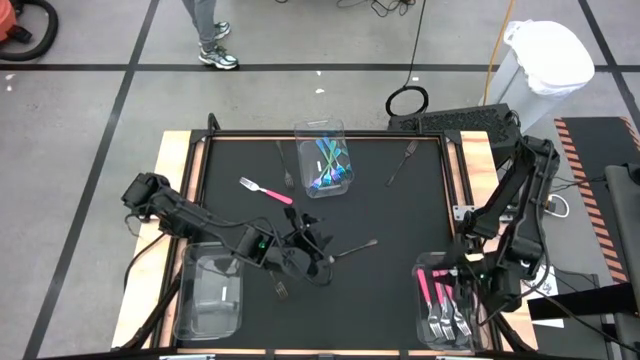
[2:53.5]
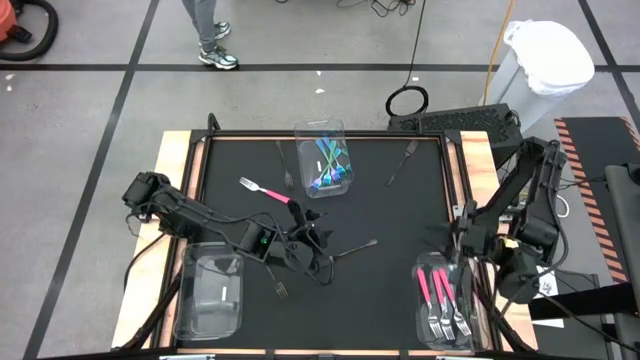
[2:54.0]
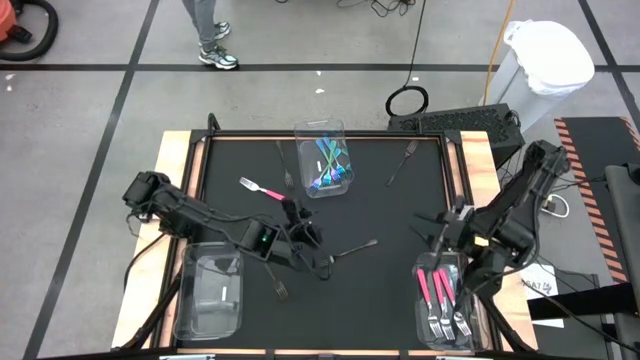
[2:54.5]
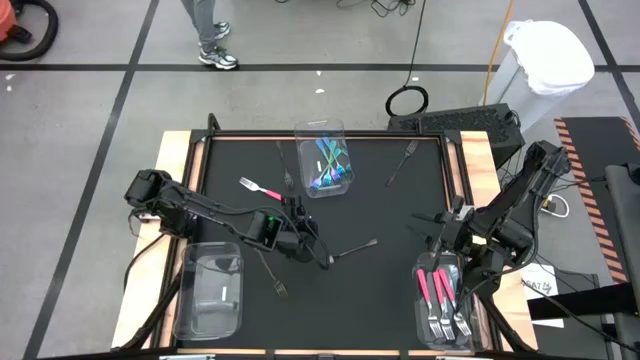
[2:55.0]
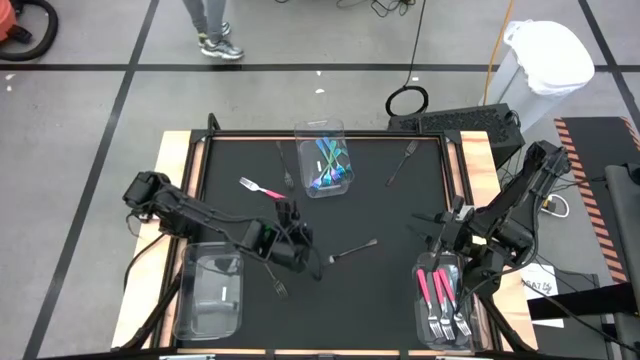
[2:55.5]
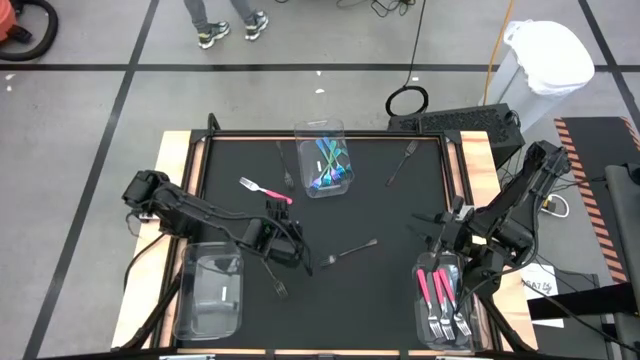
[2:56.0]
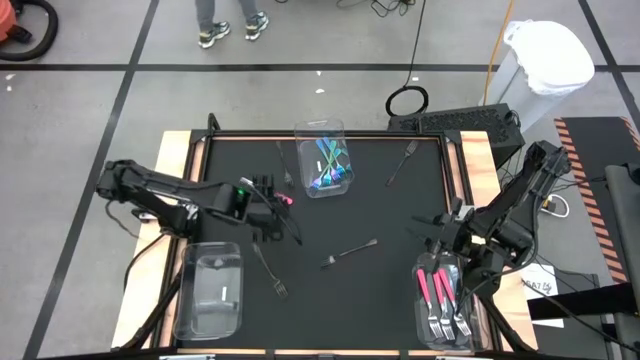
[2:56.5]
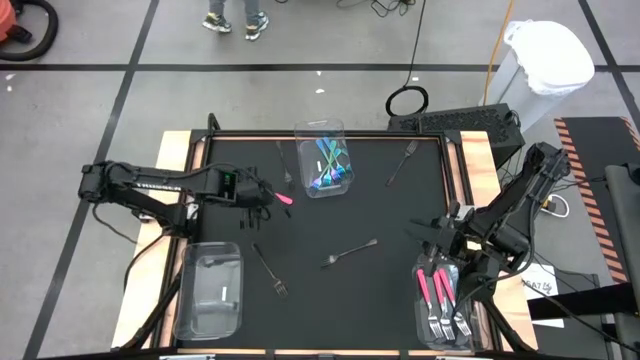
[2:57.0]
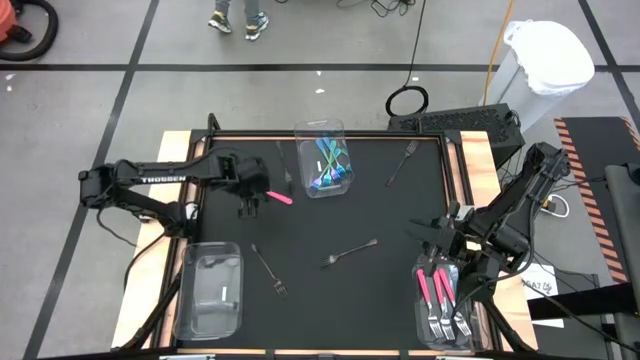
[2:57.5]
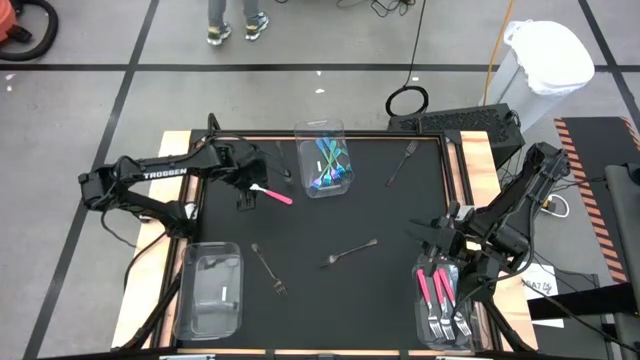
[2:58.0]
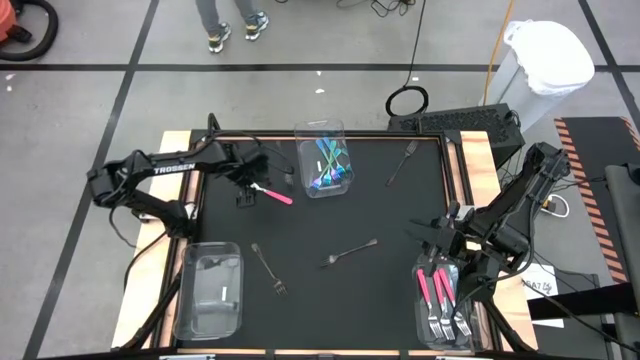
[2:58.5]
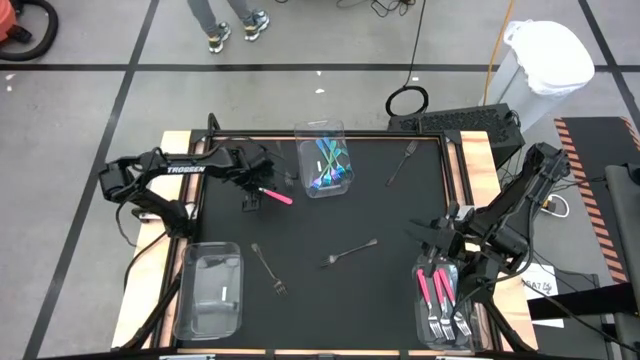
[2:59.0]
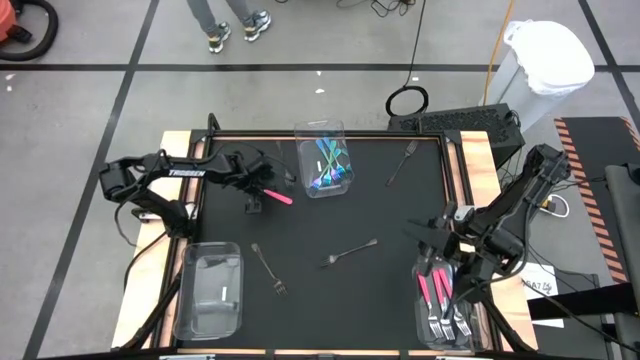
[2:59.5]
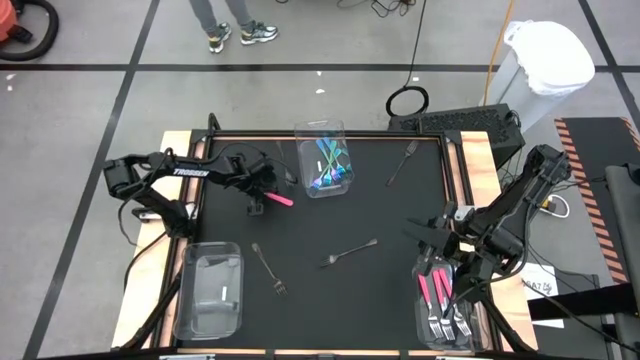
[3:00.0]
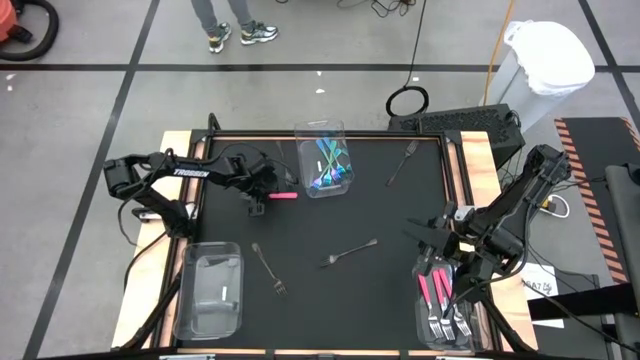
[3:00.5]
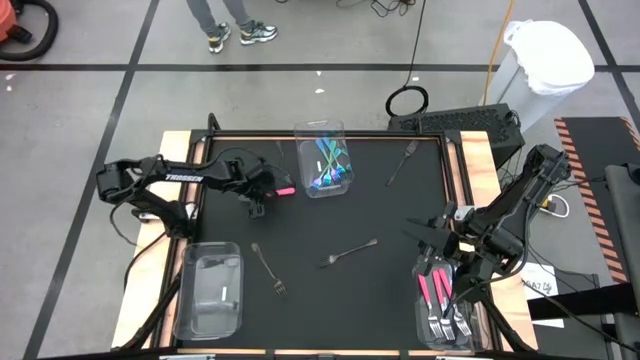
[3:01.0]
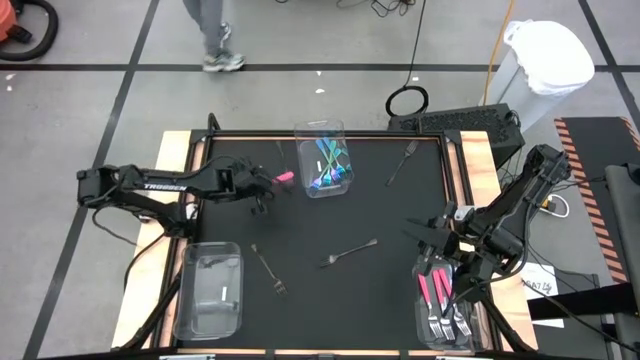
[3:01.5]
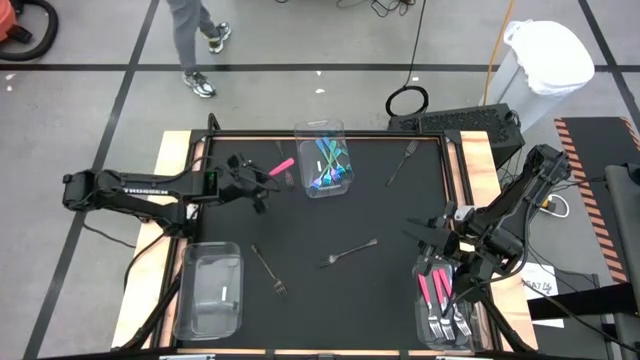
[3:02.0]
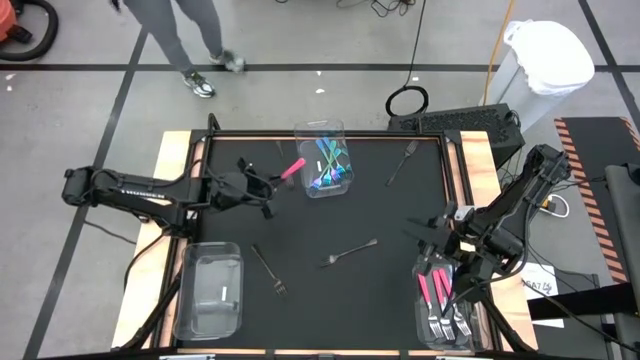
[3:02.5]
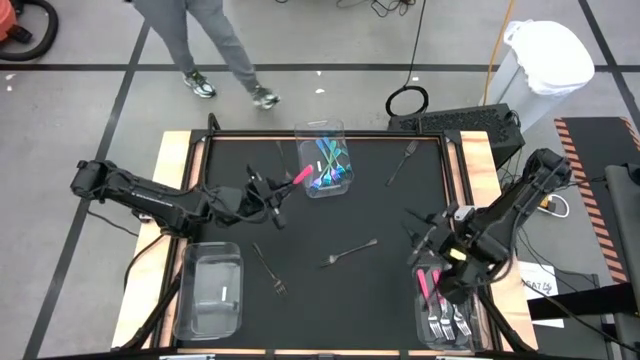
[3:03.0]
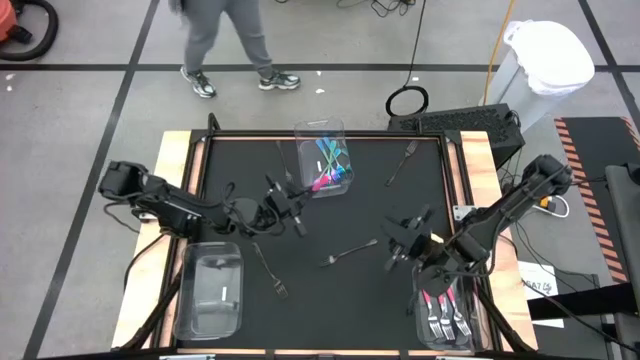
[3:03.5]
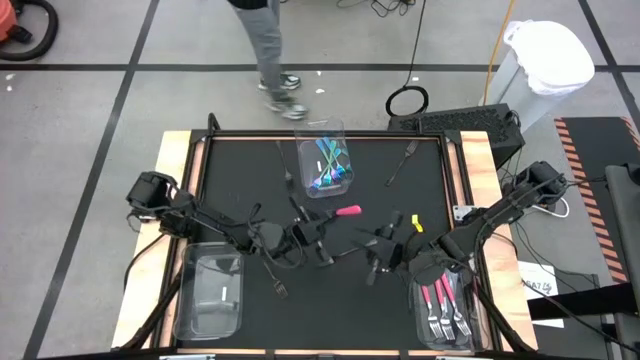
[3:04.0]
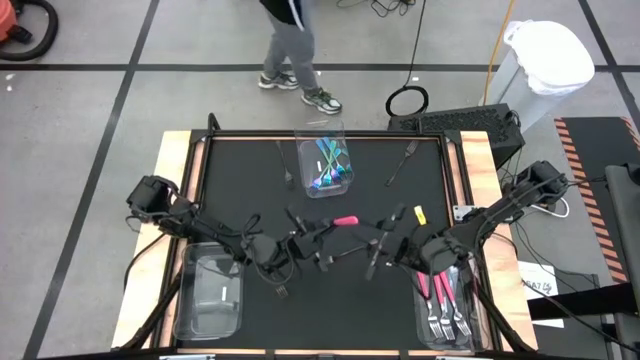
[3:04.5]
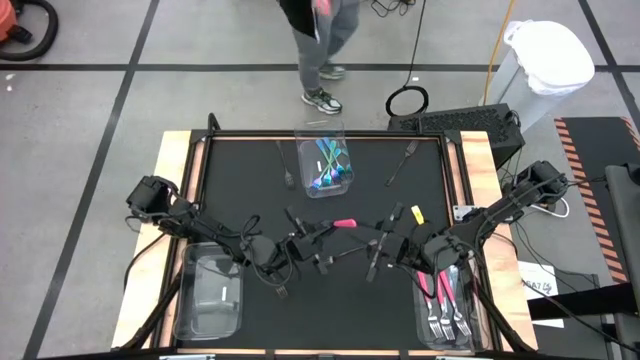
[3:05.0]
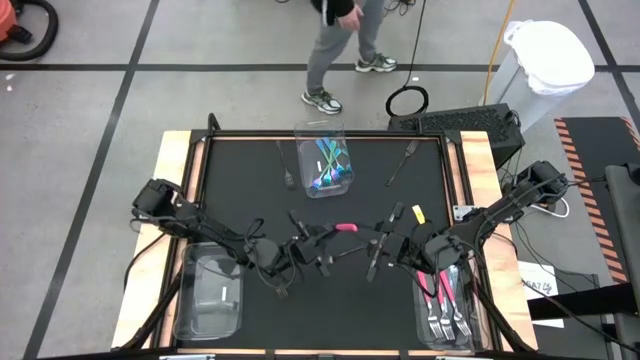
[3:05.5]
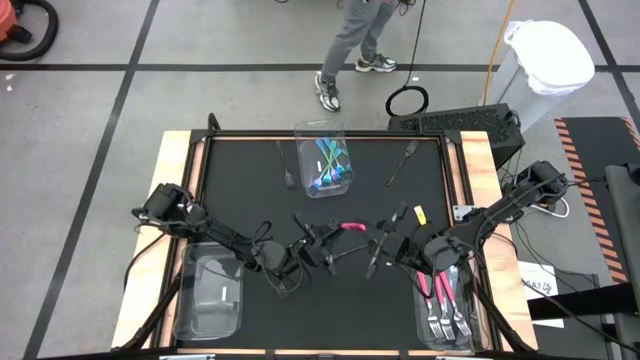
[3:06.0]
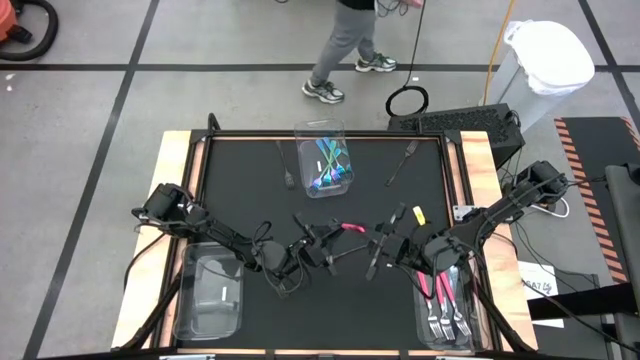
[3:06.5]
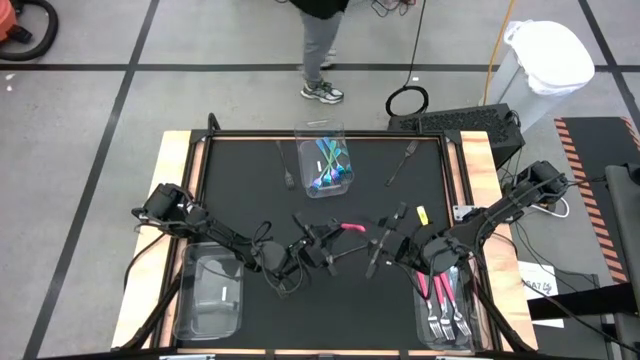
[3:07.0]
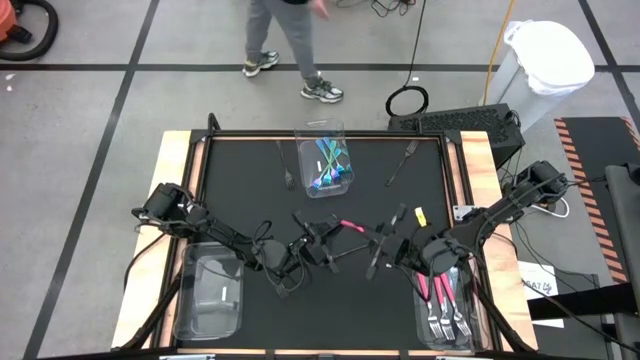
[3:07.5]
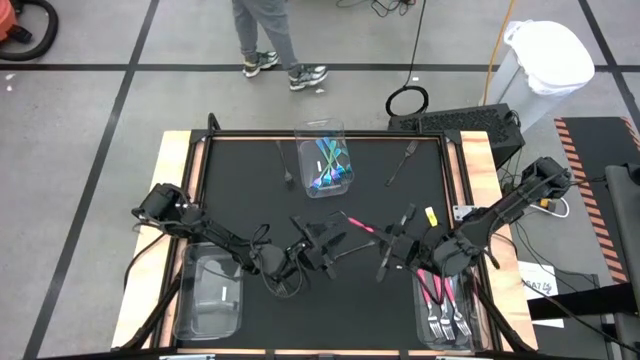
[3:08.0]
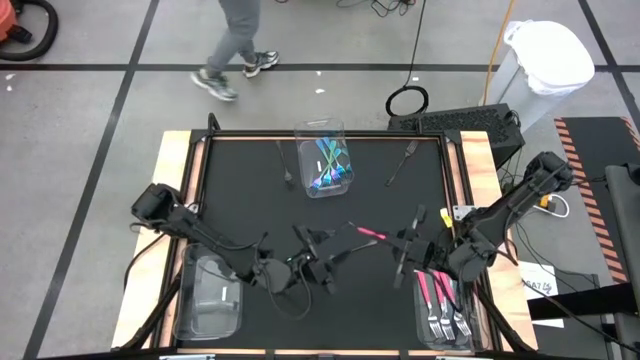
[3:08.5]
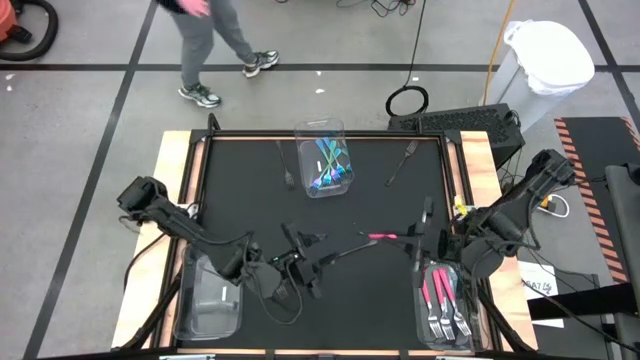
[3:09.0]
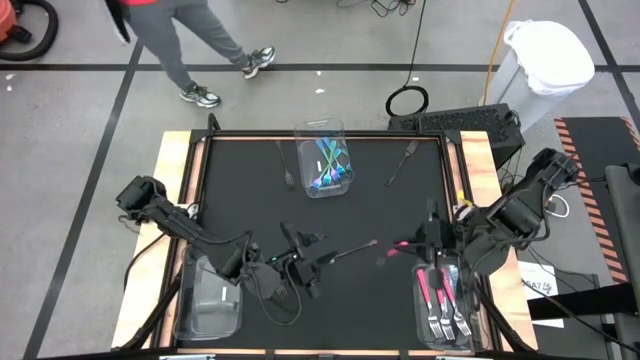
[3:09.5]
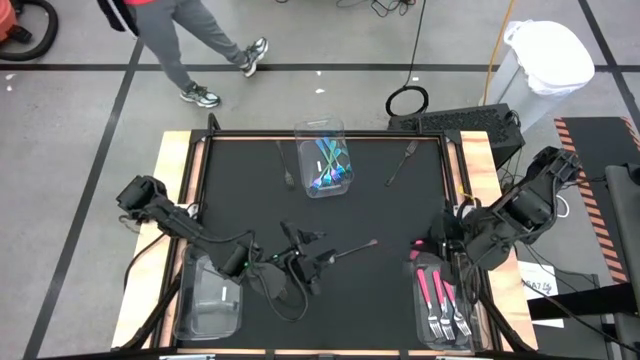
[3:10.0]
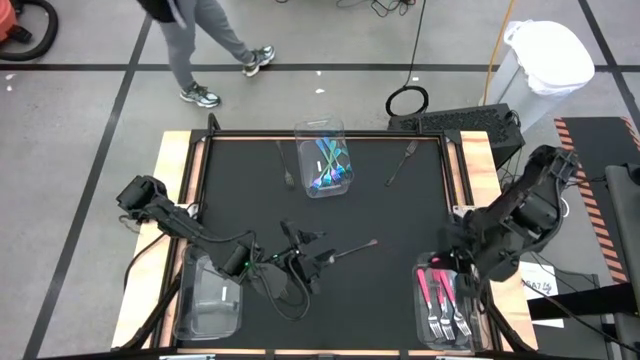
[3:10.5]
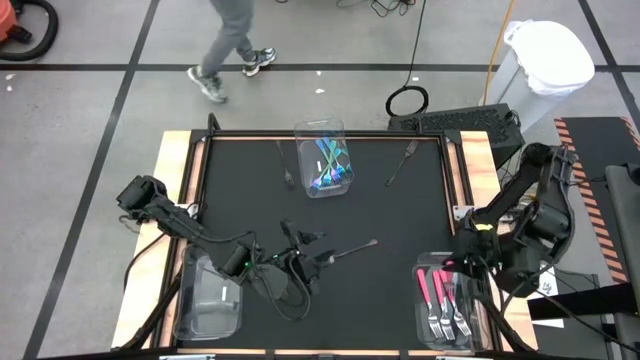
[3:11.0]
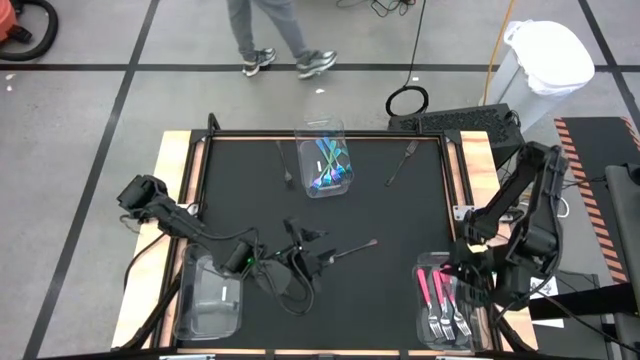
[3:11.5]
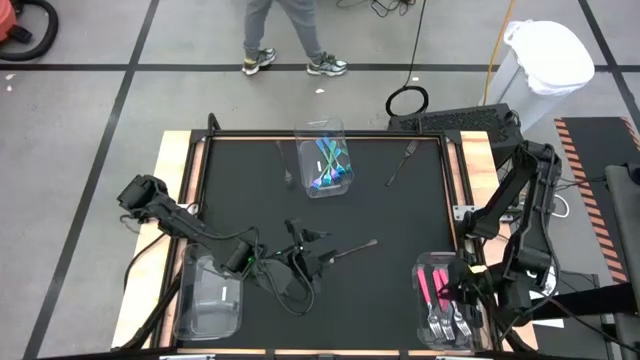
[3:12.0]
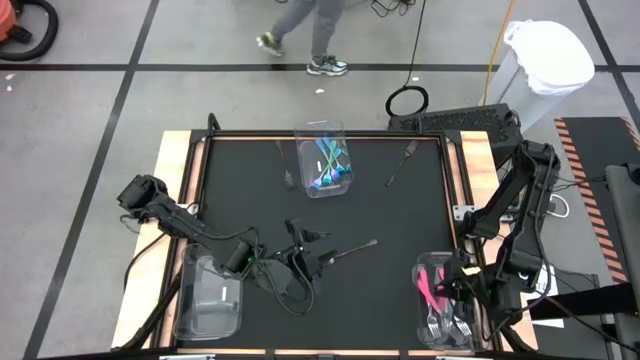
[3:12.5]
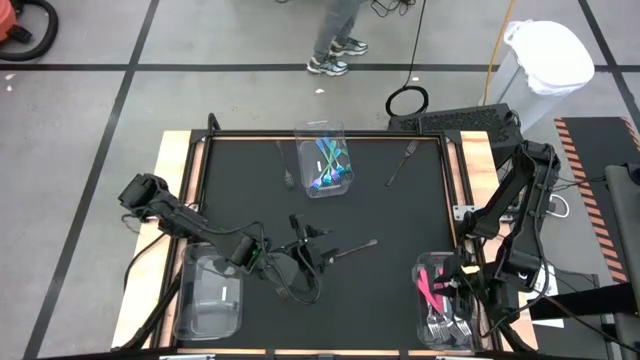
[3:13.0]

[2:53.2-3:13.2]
Task: Sort silverware by color (type)
Put the pink fork into the bottom right transparent bin

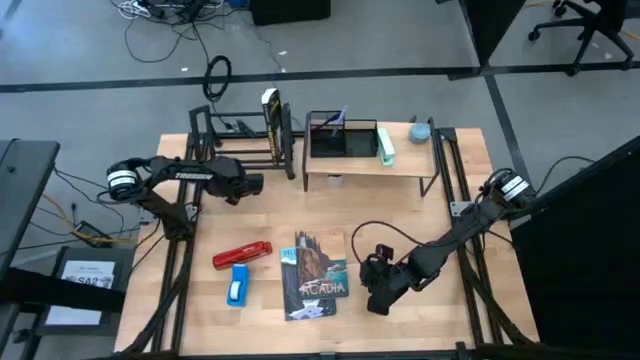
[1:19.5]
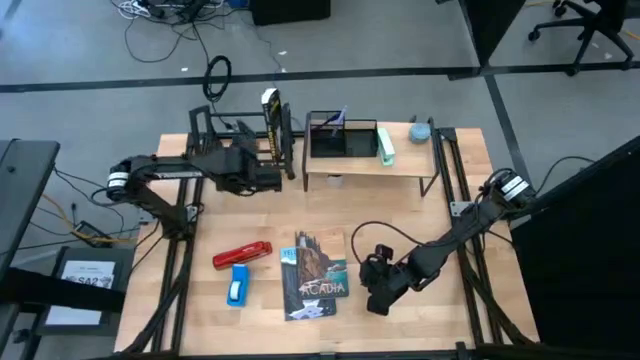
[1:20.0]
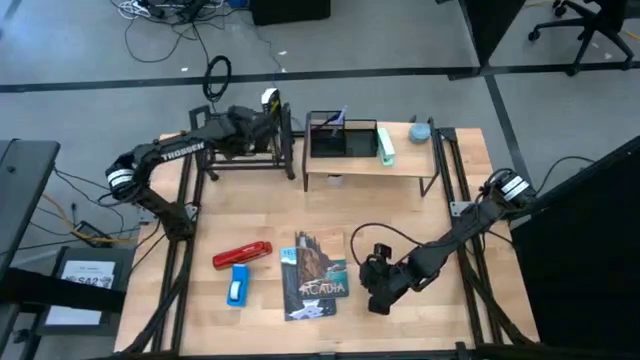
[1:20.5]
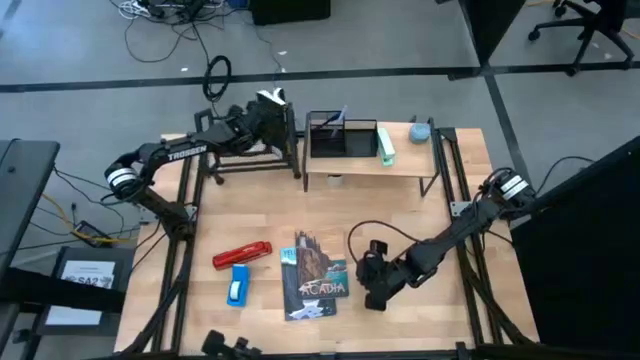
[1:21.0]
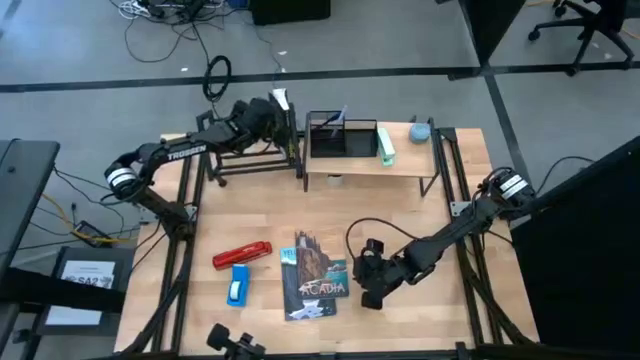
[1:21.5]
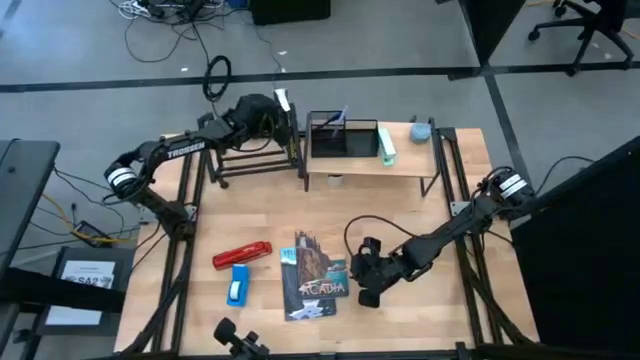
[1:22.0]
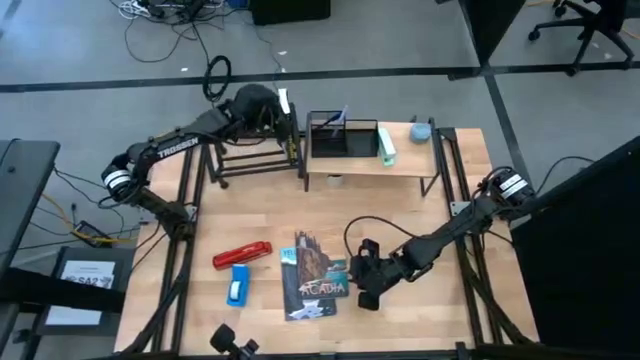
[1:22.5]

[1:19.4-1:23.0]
Task: Stock shelves
Adjust the black book on the bookshelf
